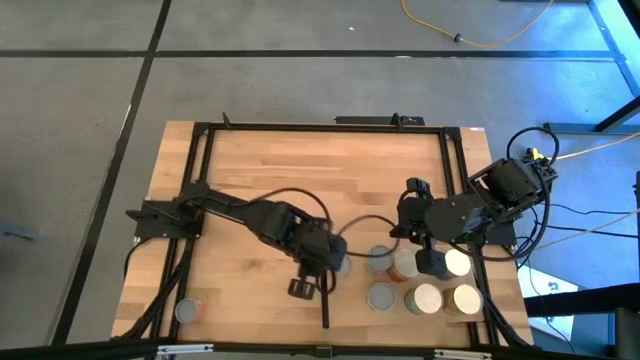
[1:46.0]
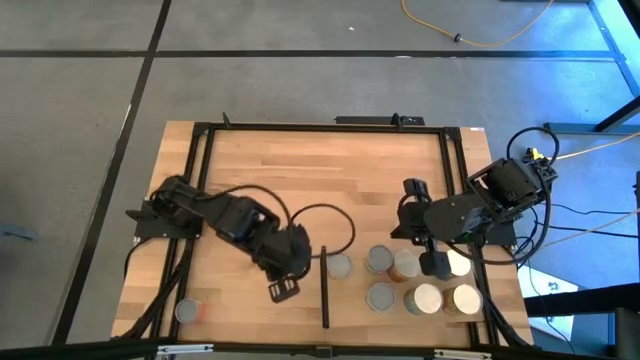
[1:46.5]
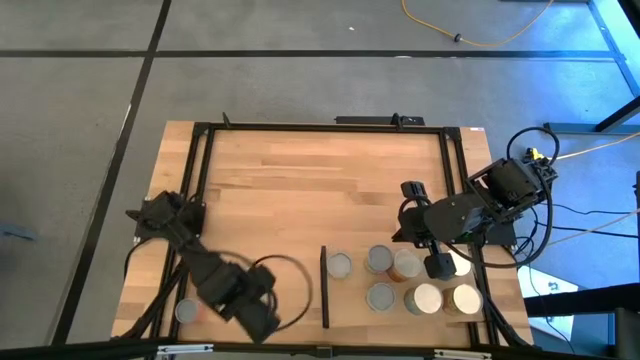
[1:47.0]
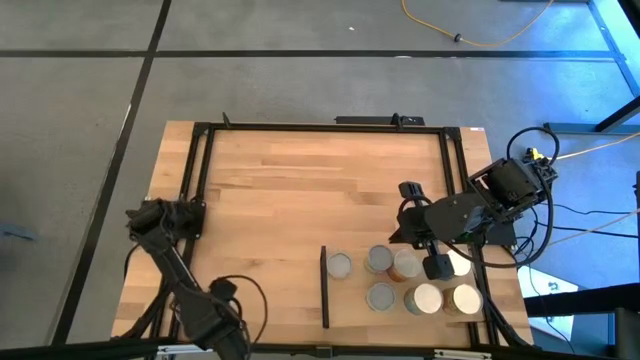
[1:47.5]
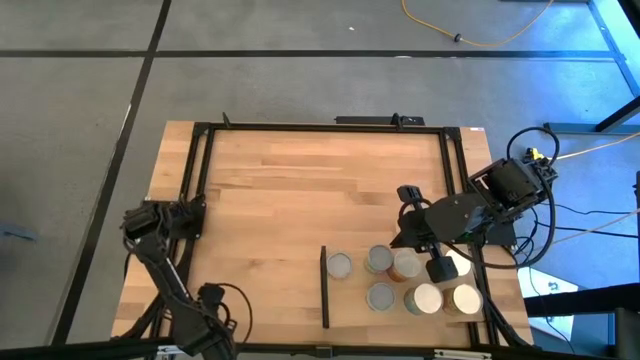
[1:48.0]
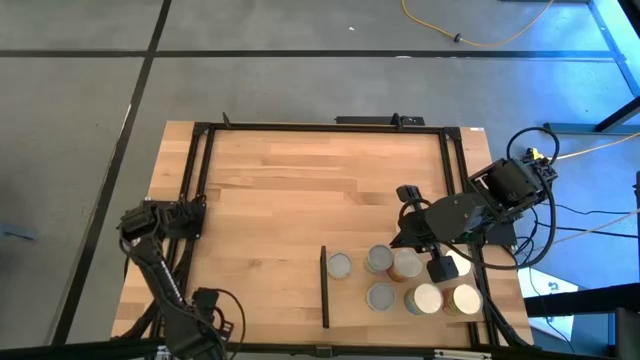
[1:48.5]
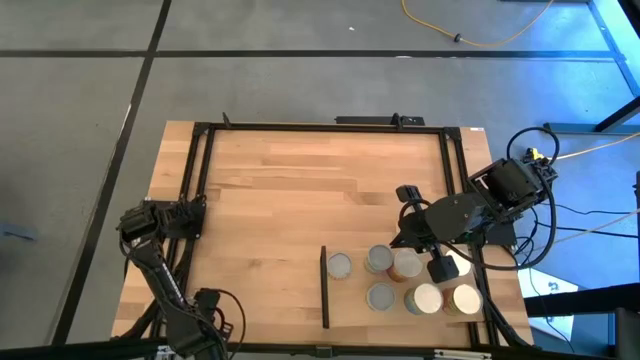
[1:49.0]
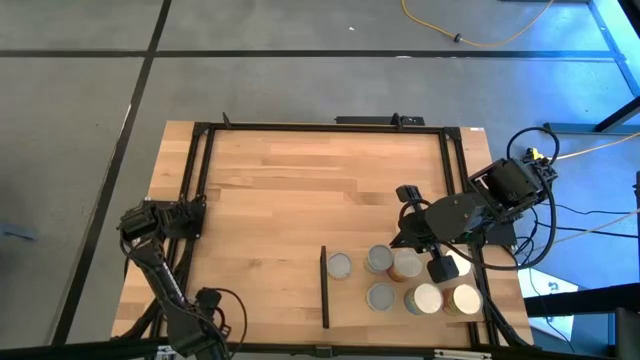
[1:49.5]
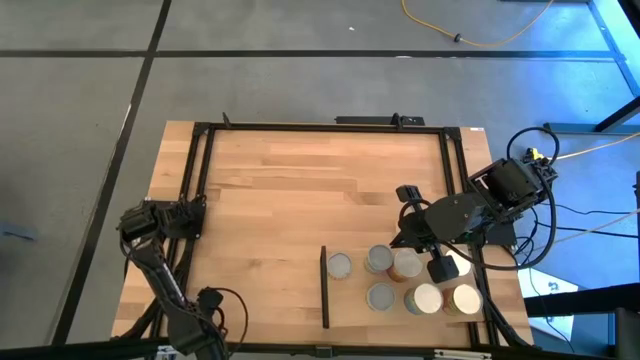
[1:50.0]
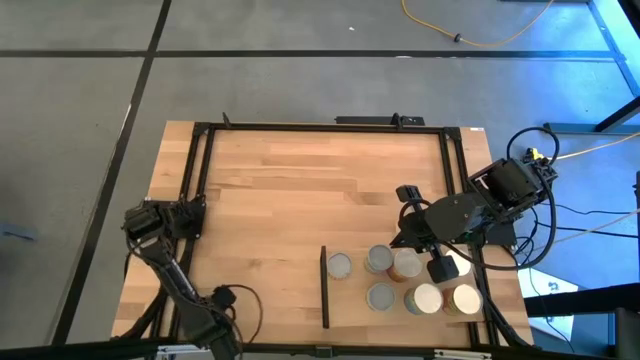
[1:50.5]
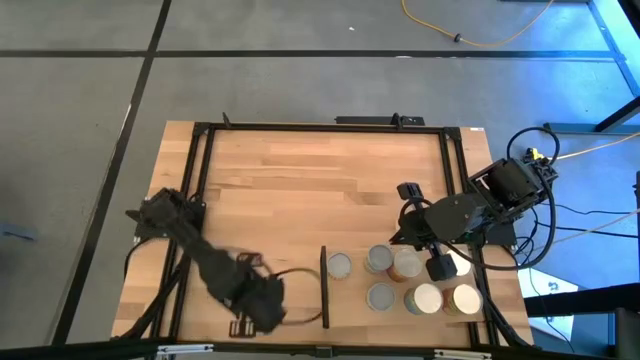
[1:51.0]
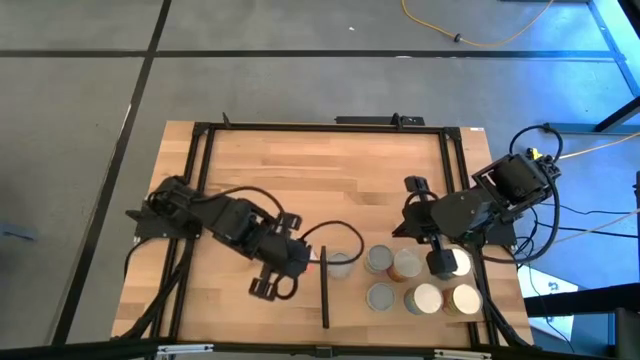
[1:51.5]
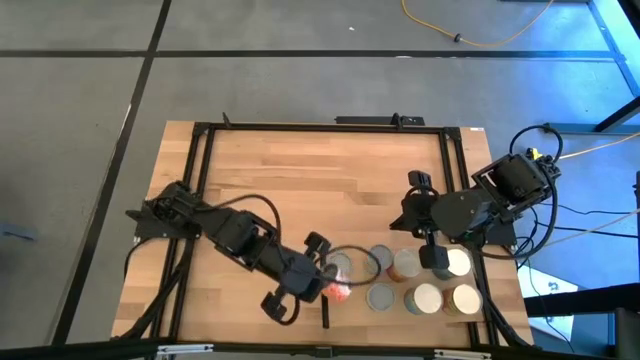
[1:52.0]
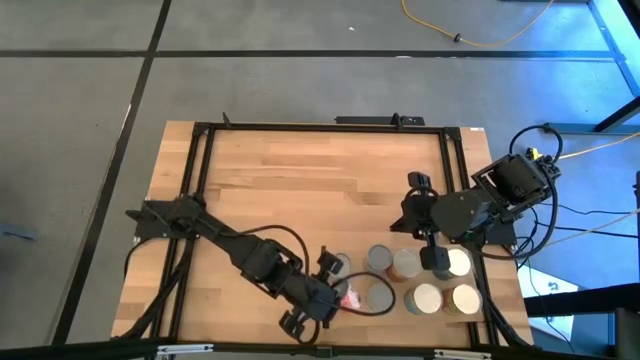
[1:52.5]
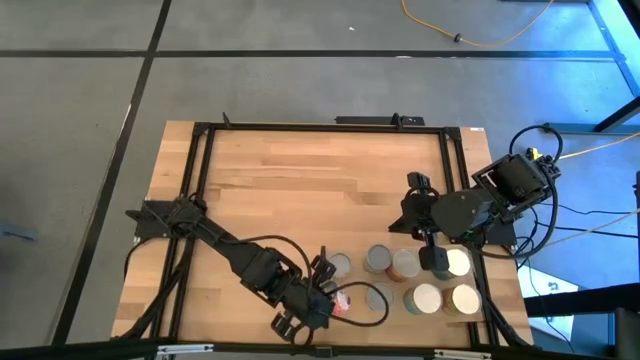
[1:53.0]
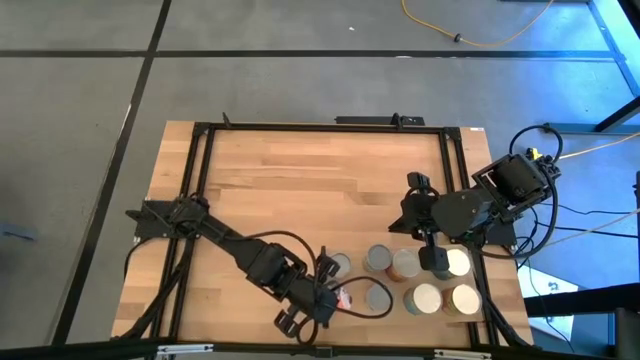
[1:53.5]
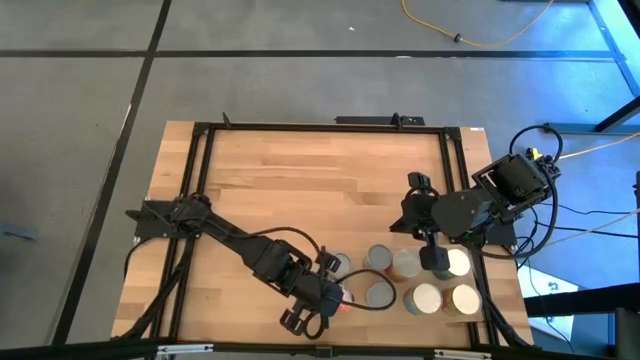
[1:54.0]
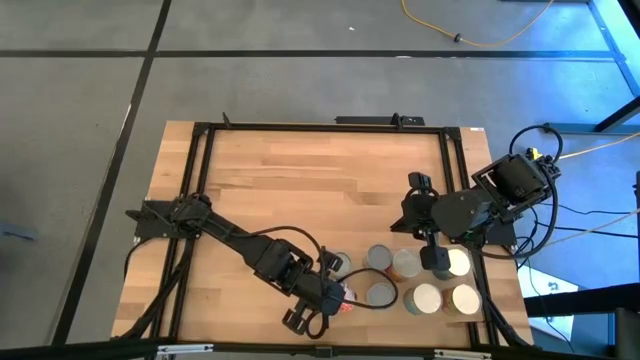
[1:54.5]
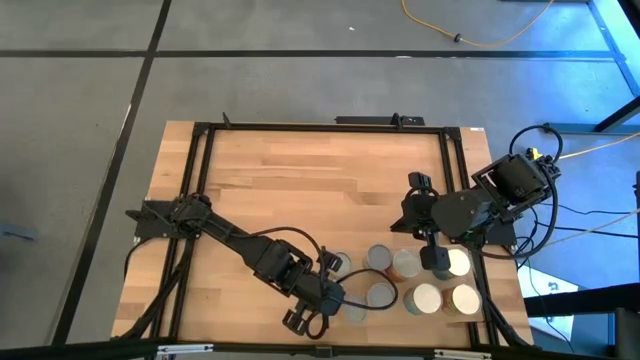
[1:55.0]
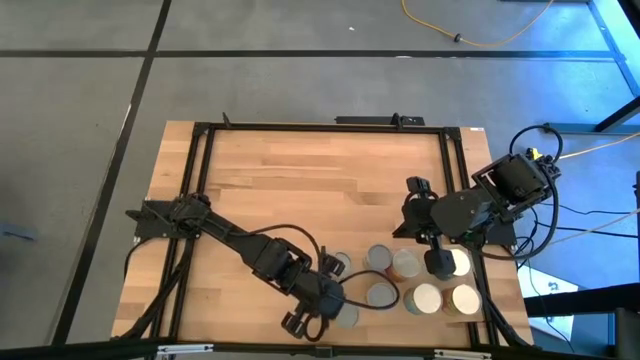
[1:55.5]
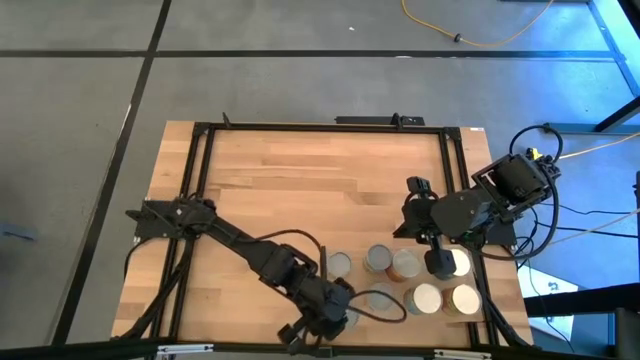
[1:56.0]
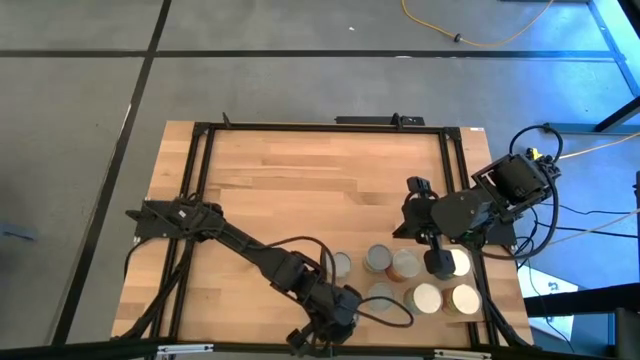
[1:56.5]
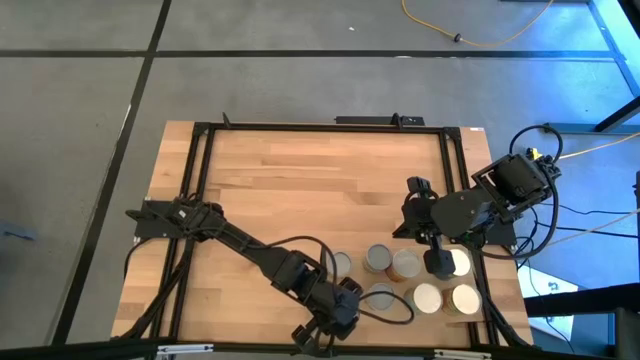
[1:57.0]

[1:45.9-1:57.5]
Task: Pick and place cans onto a shelf
Put the canned orange on the shelf

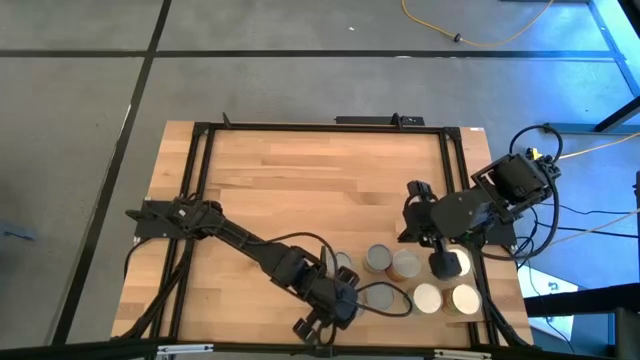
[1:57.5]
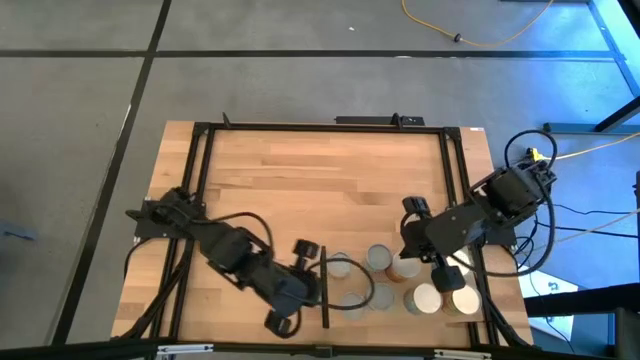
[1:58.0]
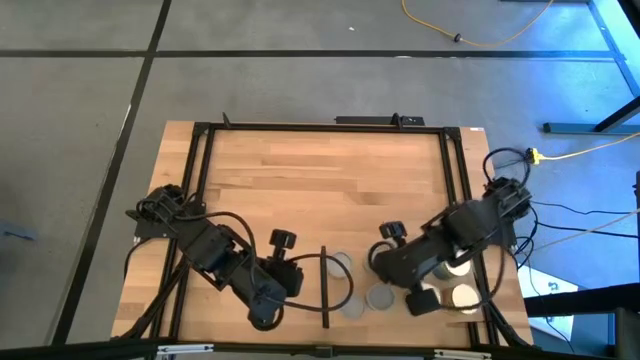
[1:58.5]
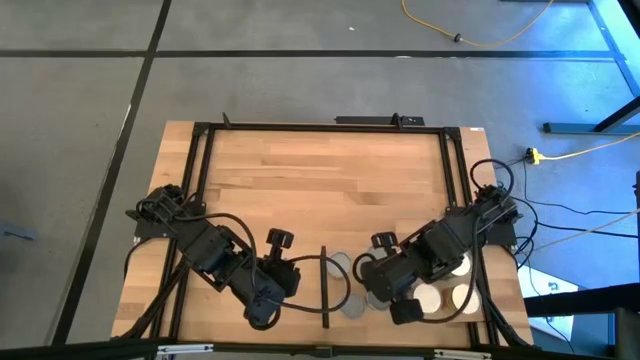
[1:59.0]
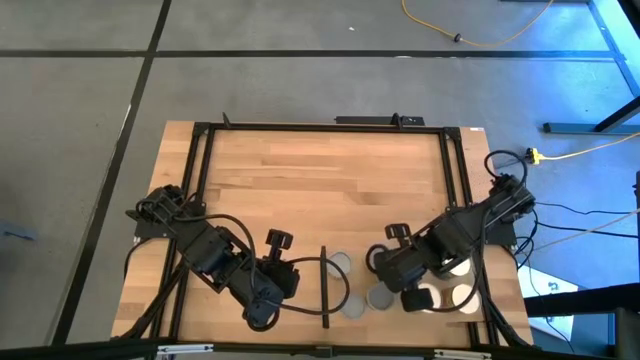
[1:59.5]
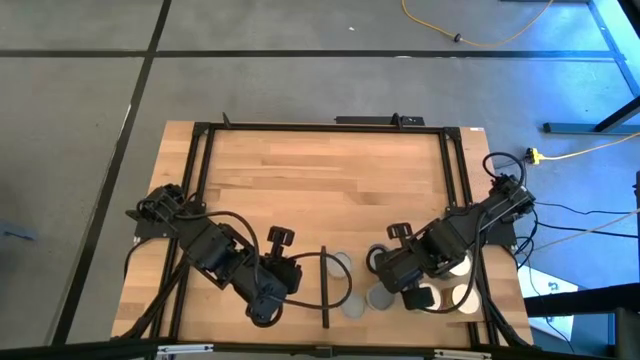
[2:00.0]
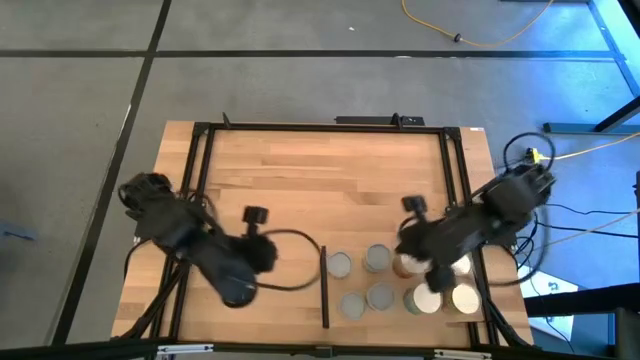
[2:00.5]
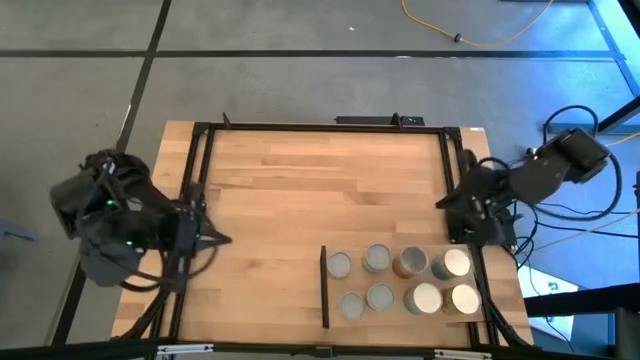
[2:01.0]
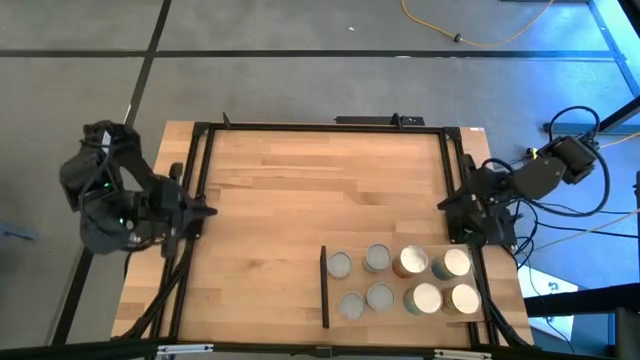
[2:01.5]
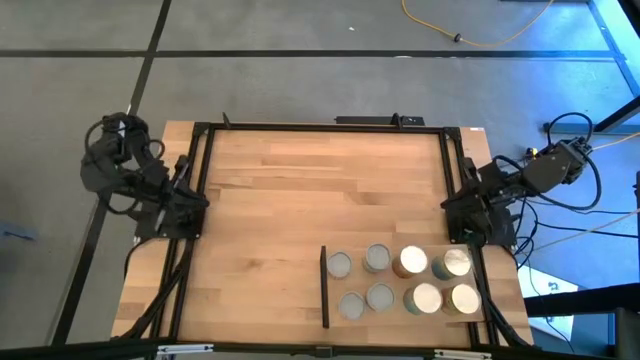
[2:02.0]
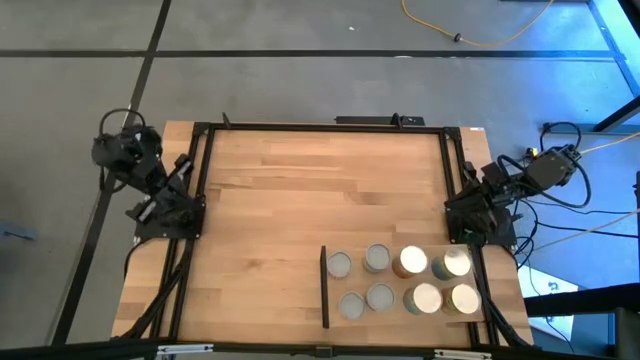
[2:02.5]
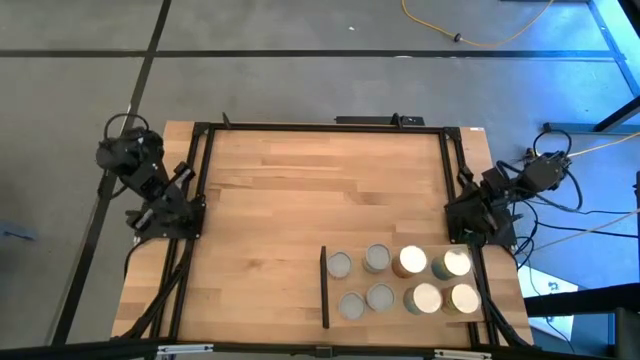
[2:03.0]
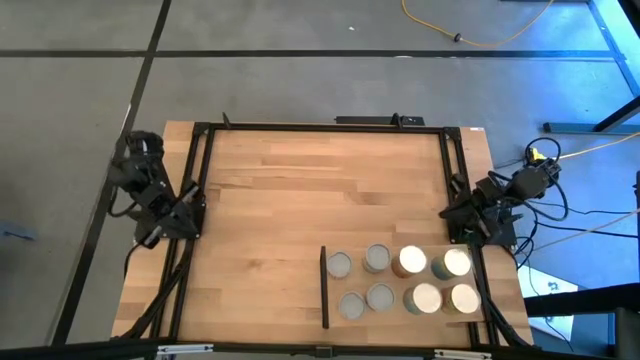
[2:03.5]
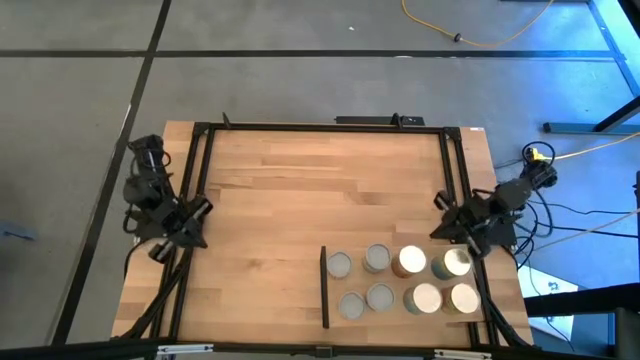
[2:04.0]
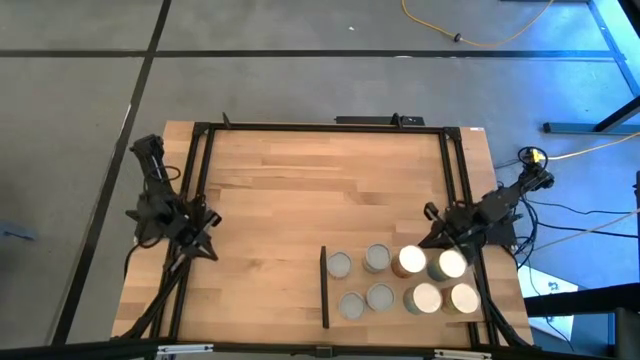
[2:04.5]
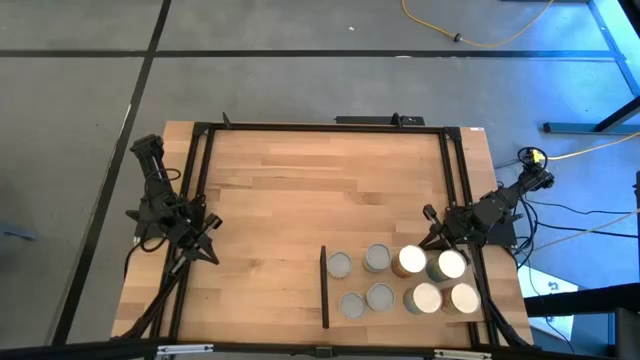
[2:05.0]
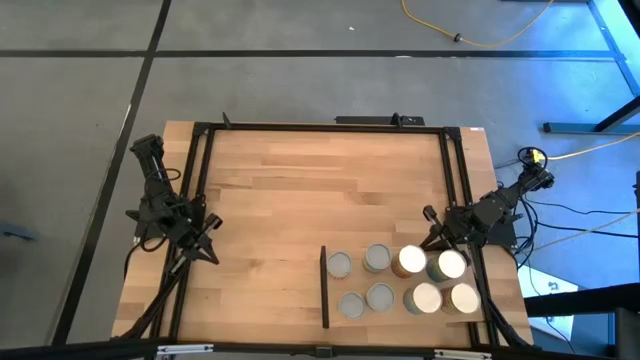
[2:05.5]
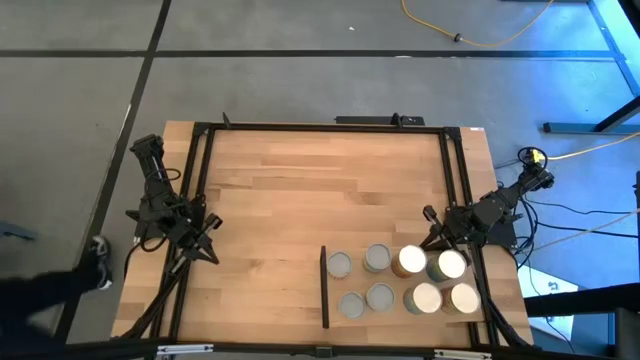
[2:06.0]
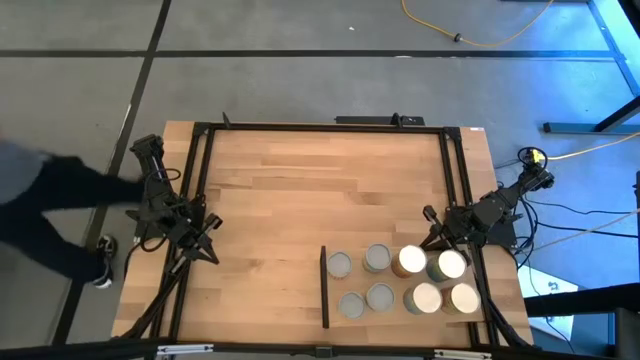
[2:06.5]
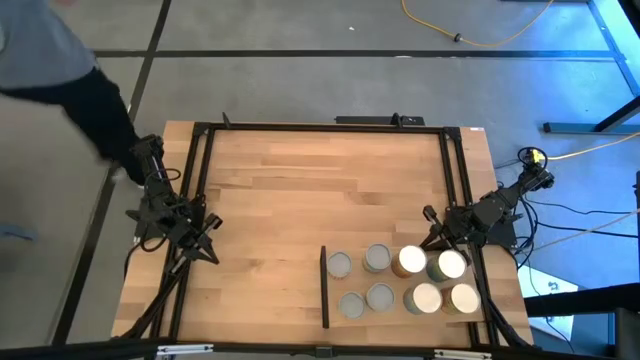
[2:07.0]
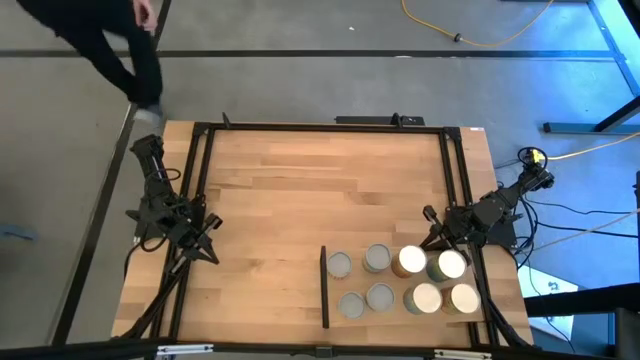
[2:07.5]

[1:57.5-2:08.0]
Return to Home Position
